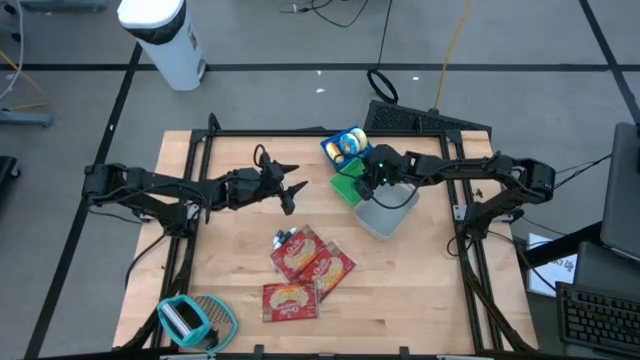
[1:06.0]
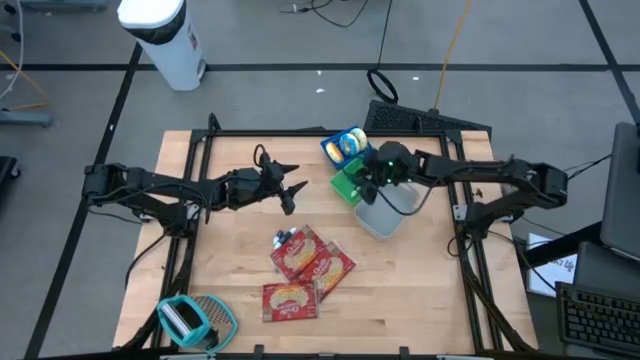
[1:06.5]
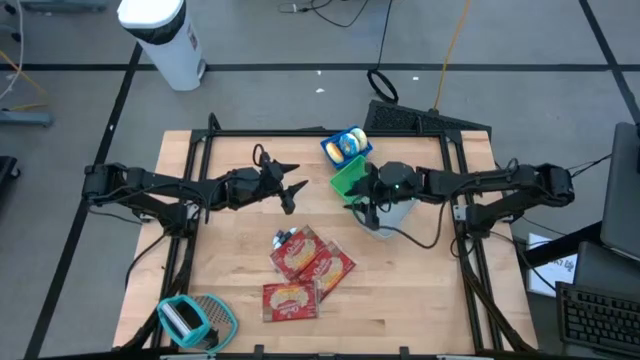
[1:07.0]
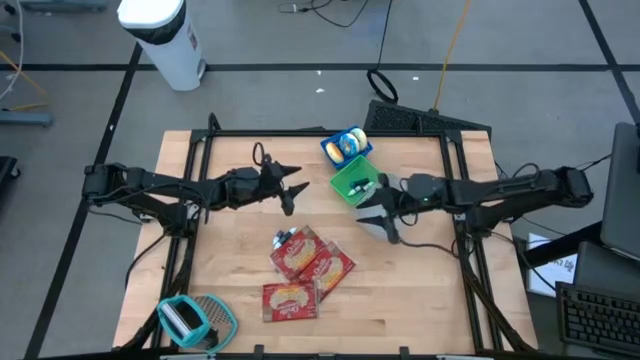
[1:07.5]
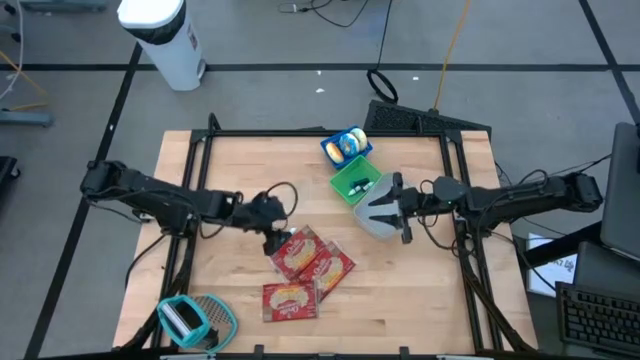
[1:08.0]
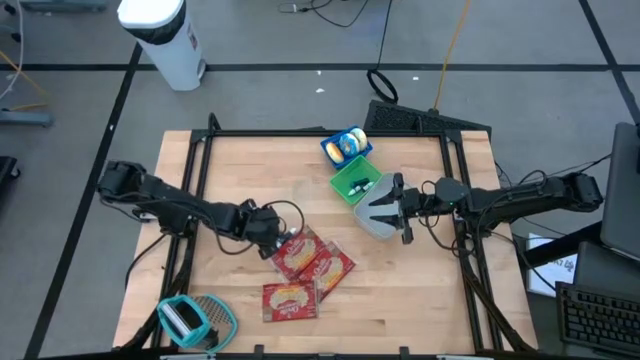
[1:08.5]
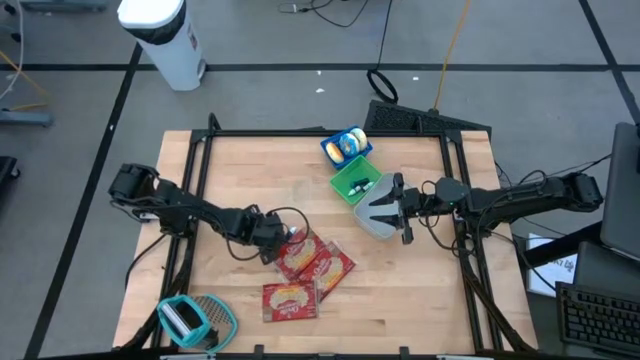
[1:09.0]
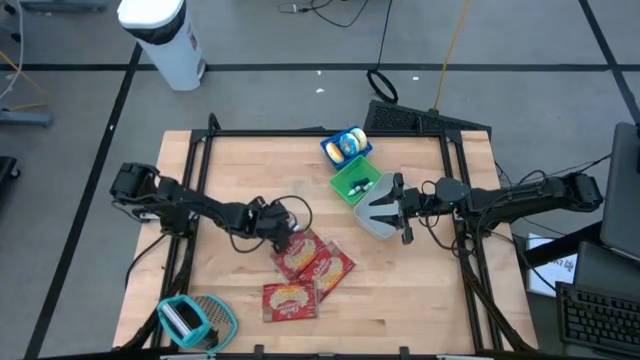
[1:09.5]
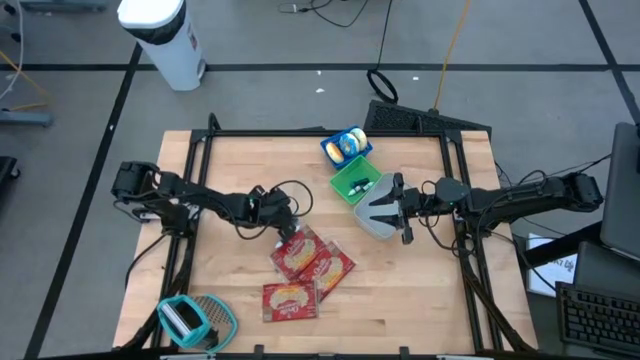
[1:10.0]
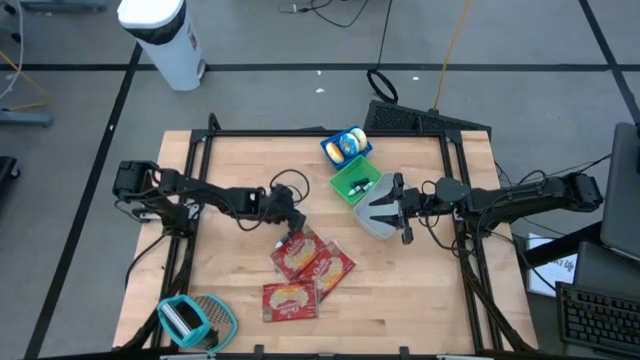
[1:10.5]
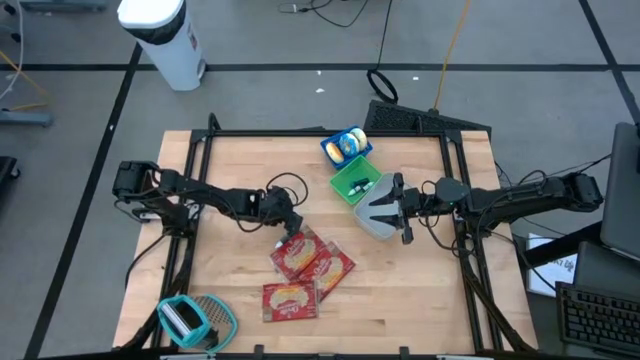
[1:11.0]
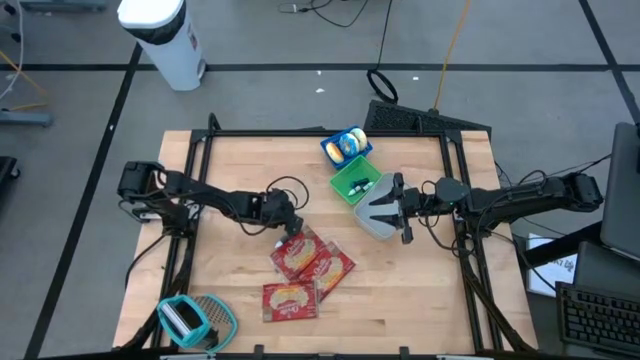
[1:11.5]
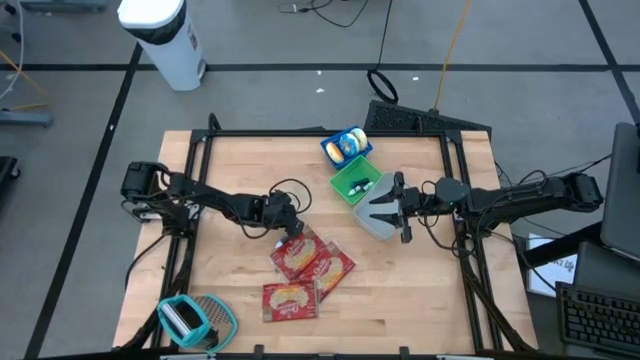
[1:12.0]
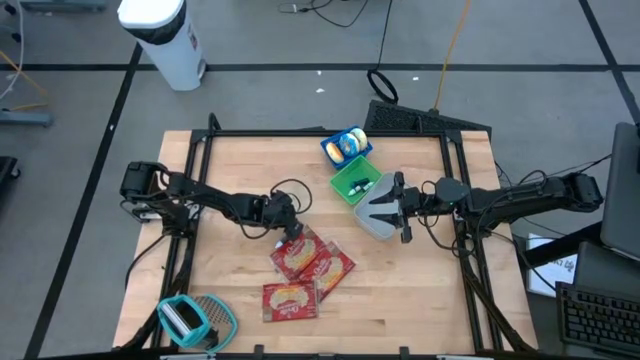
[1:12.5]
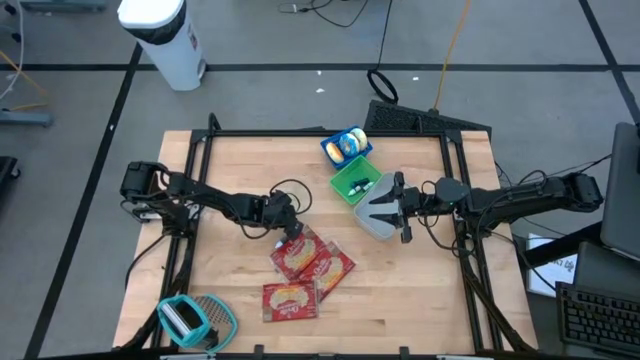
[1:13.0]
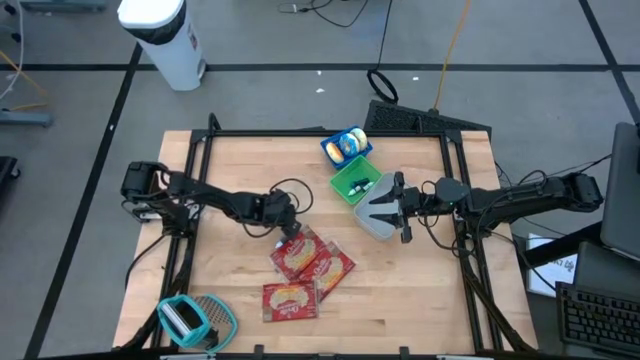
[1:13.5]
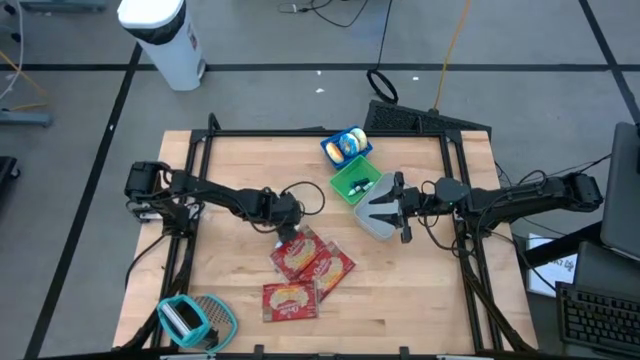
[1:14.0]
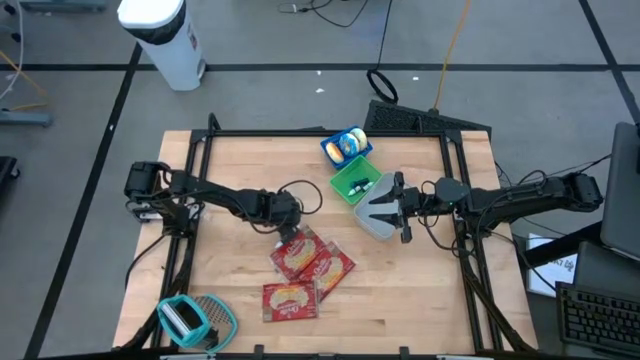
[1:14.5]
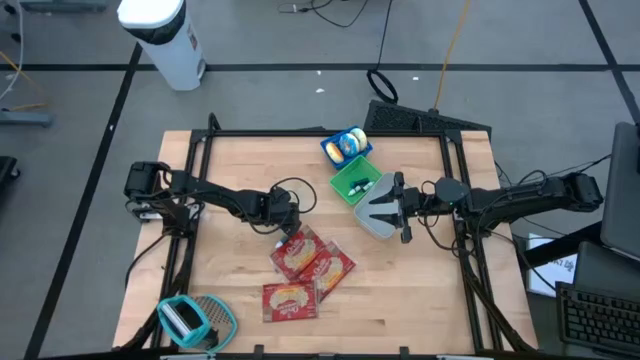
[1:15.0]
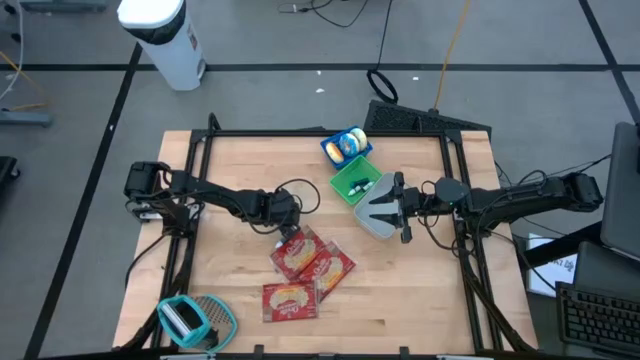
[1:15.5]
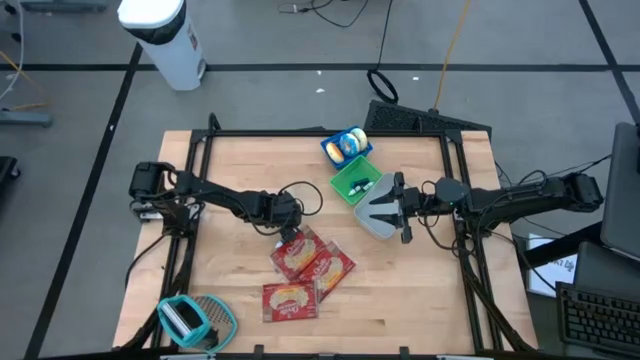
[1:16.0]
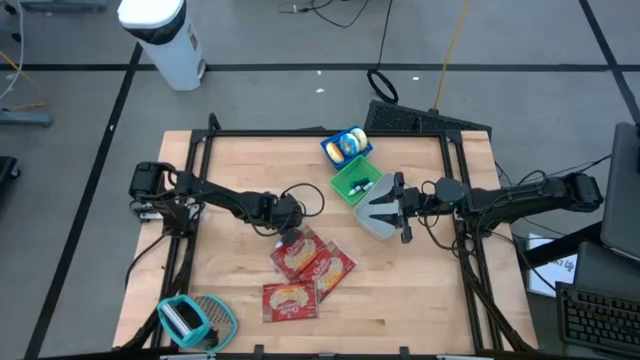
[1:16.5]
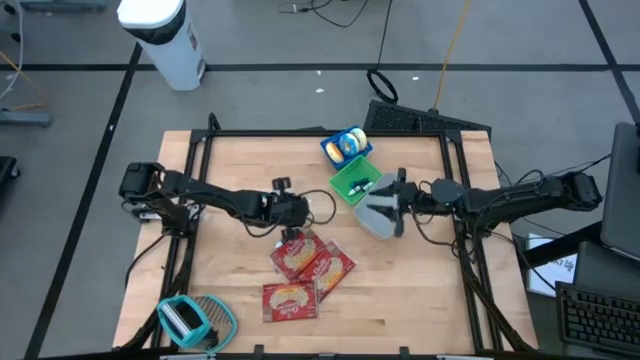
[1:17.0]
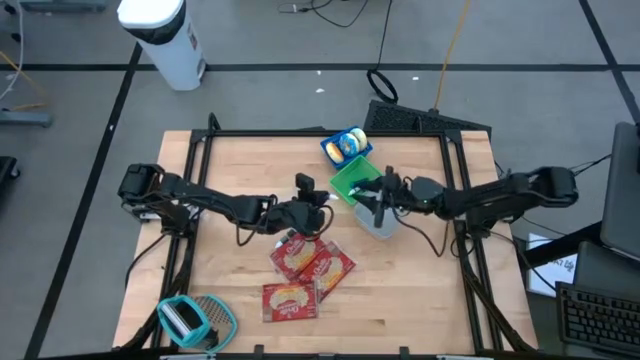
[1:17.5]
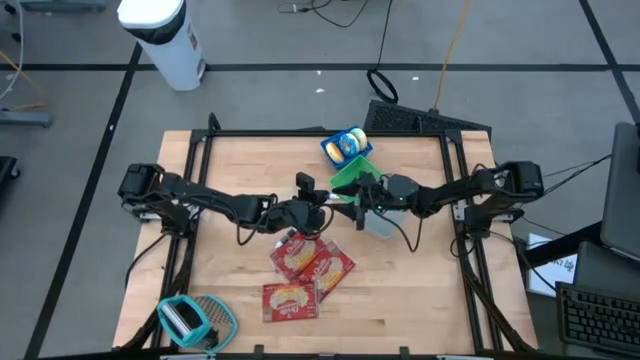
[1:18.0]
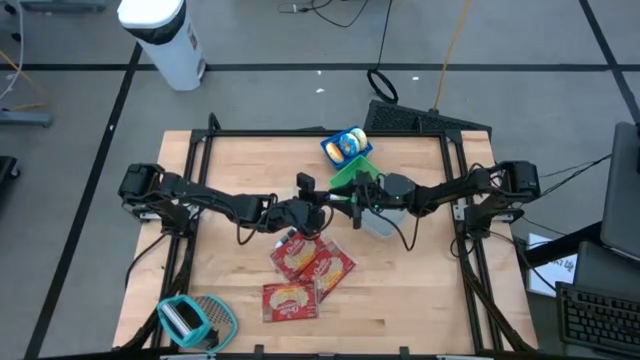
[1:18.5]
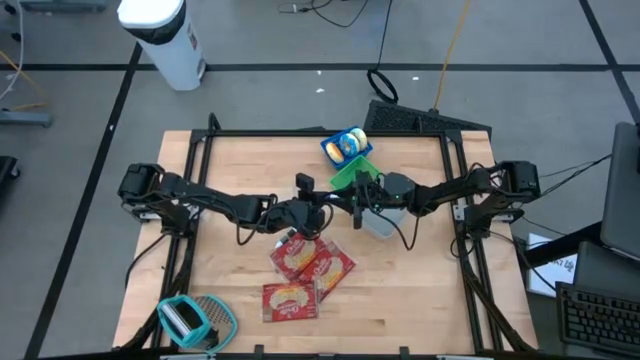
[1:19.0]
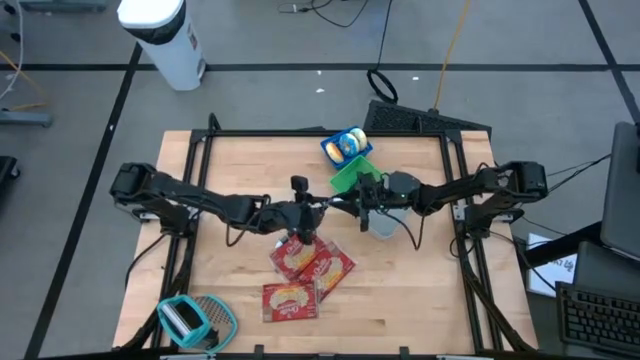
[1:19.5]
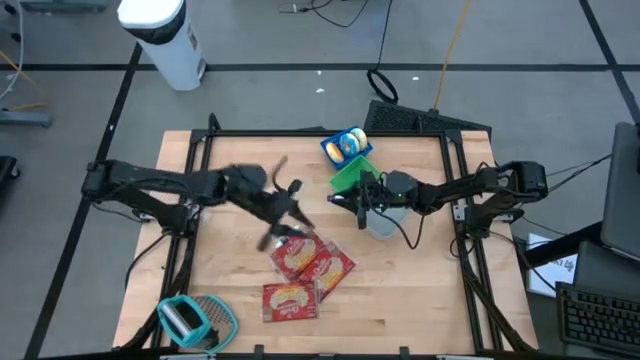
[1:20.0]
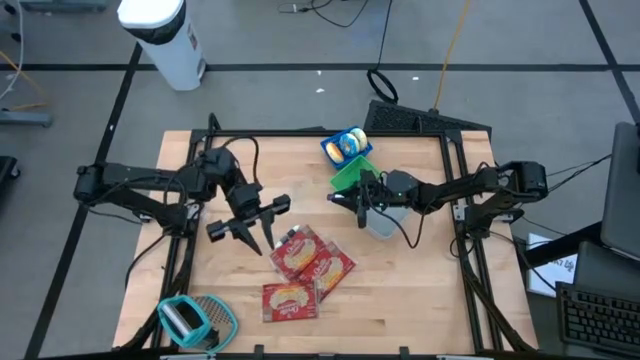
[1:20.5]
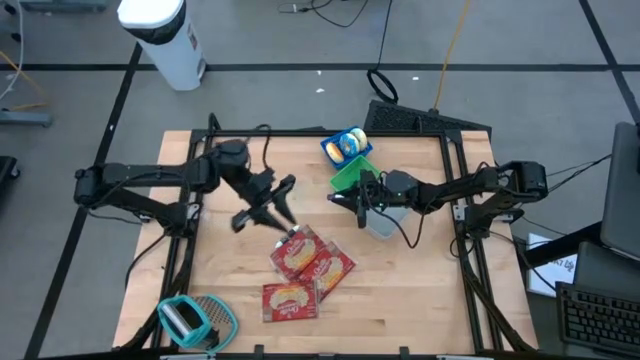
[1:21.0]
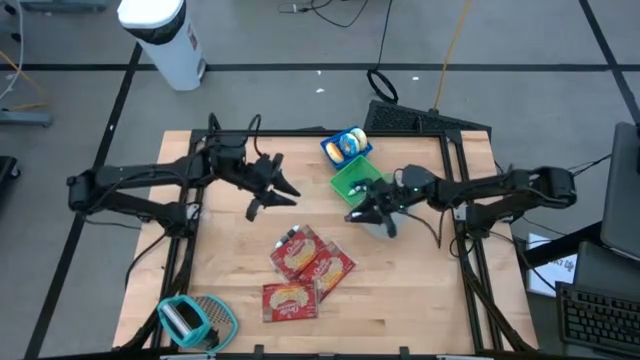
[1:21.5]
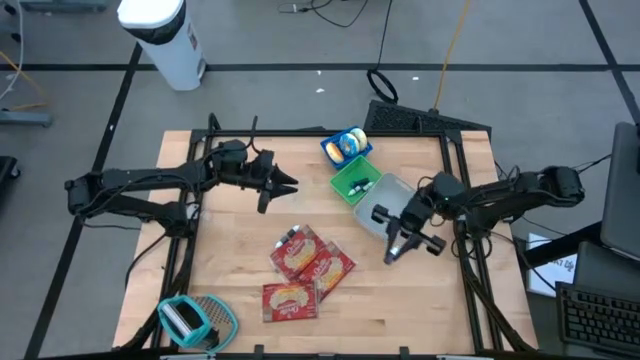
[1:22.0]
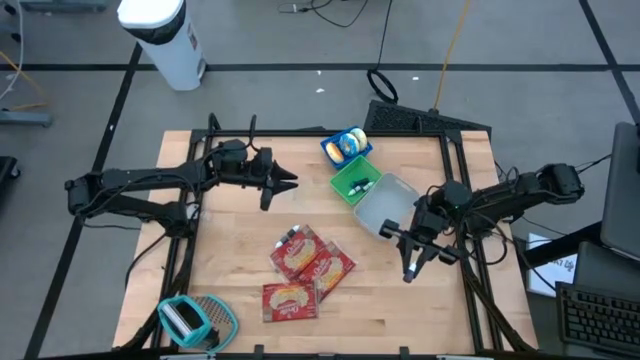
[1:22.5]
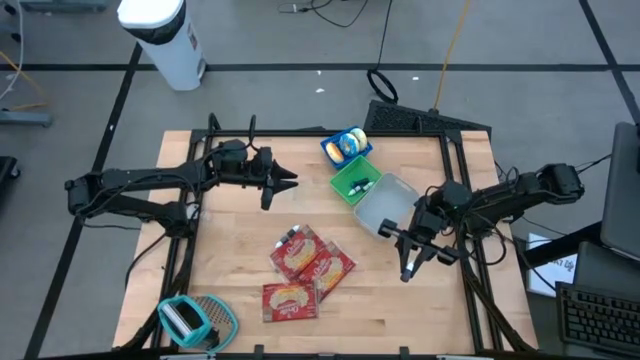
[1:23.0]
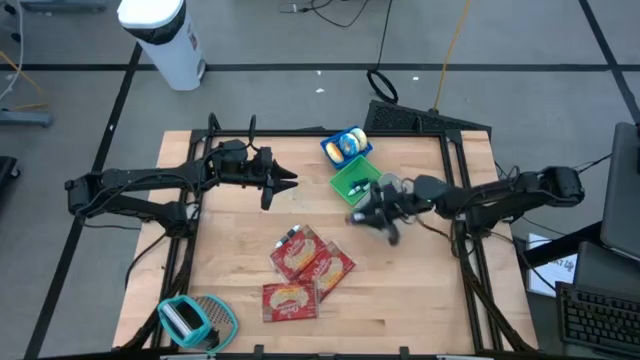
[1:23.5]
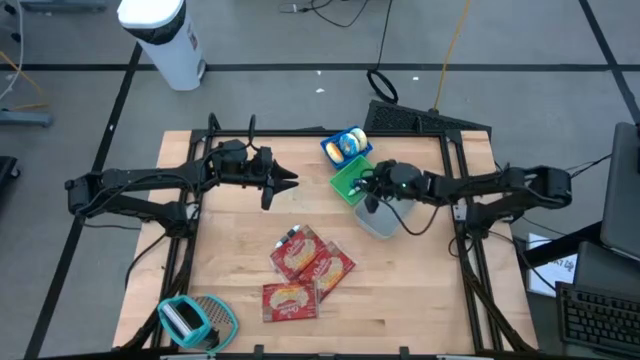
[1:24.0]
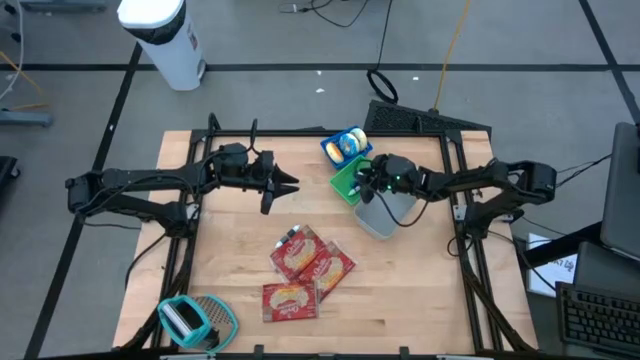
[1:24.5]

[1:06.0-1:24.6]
Put the small purple food coloring bottle into the green bin
